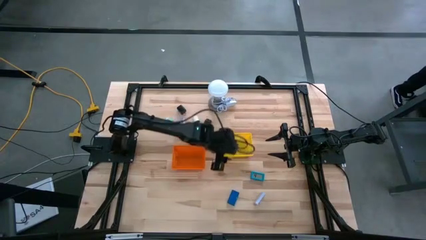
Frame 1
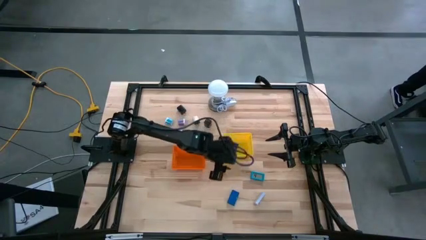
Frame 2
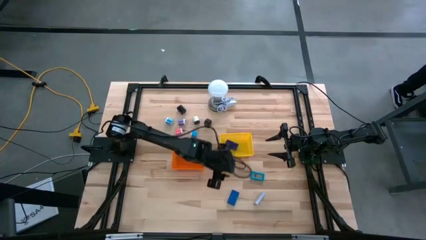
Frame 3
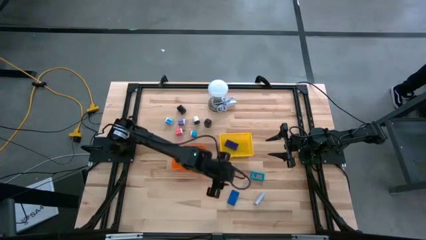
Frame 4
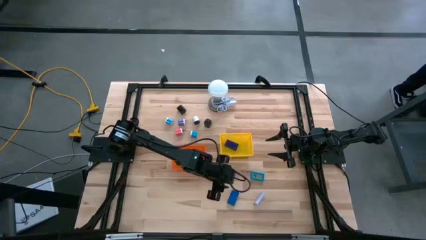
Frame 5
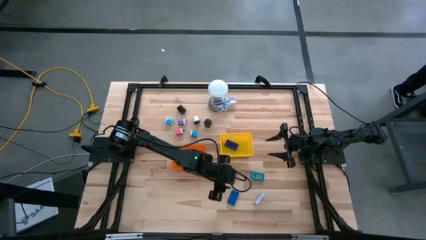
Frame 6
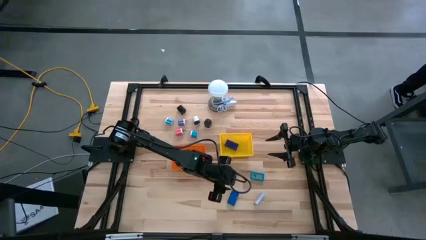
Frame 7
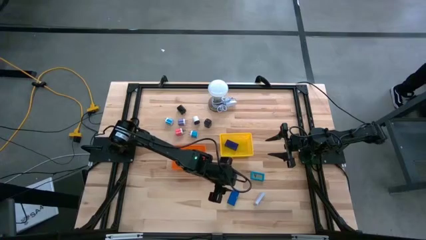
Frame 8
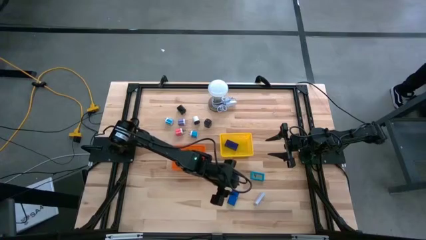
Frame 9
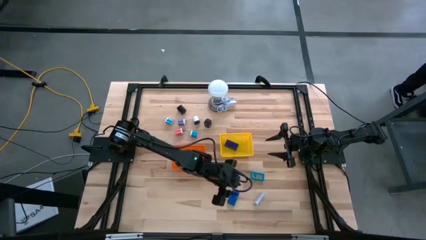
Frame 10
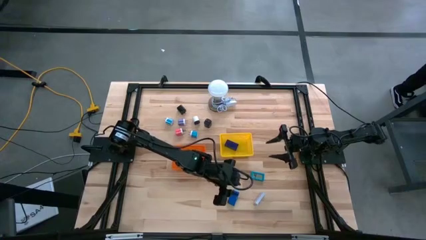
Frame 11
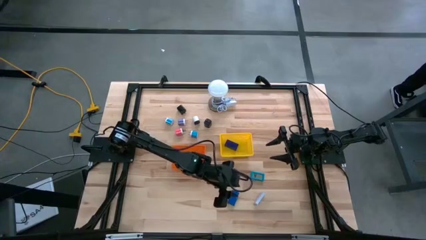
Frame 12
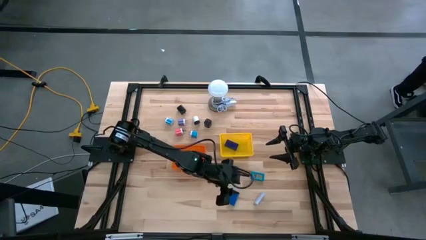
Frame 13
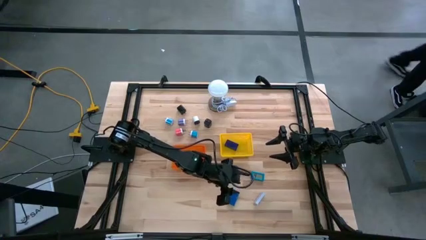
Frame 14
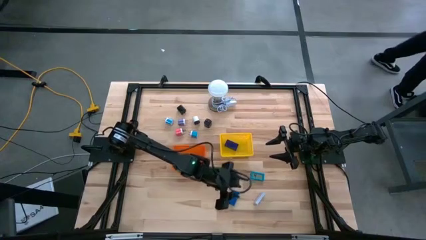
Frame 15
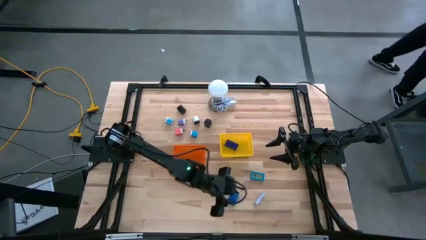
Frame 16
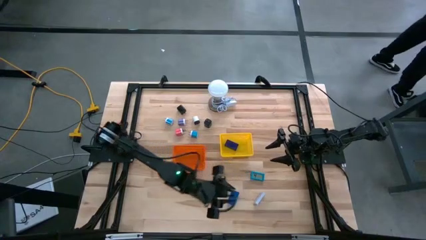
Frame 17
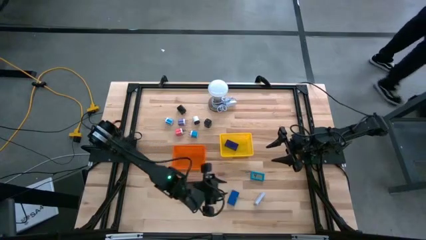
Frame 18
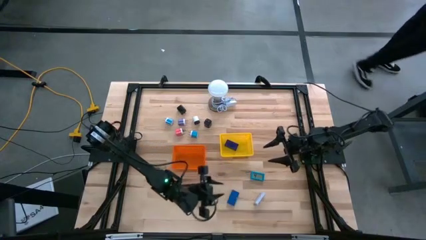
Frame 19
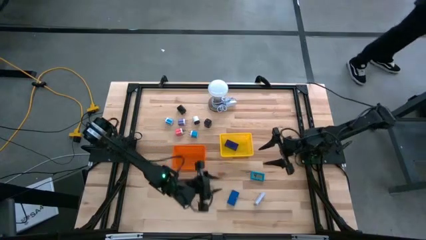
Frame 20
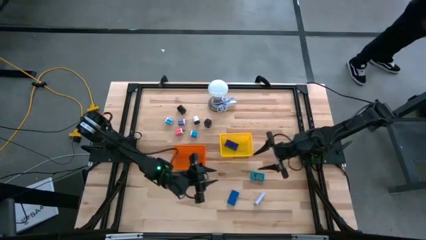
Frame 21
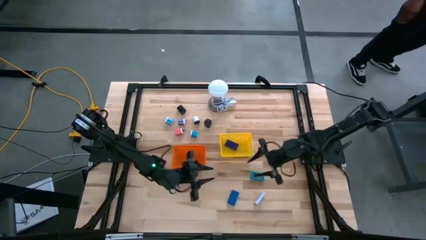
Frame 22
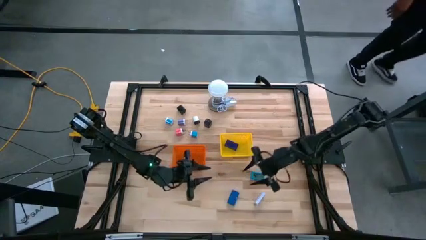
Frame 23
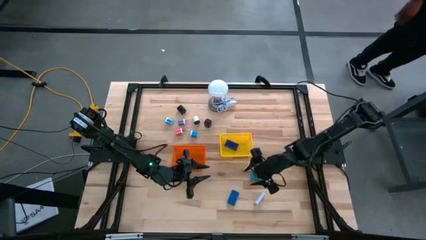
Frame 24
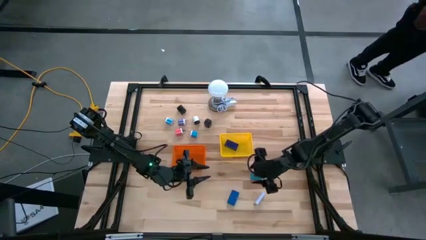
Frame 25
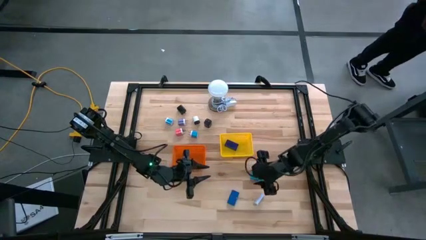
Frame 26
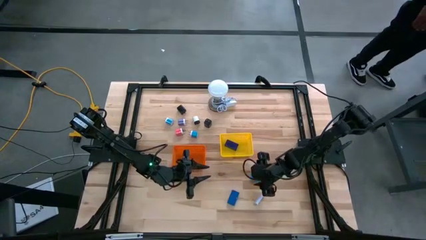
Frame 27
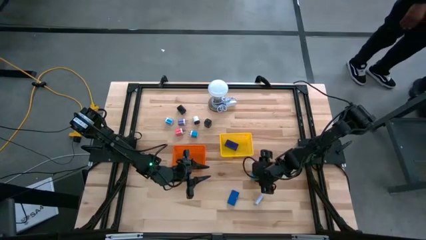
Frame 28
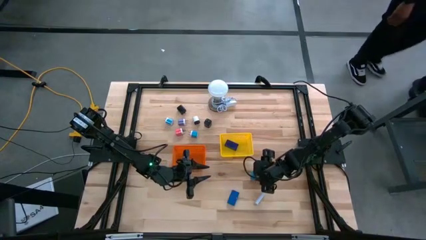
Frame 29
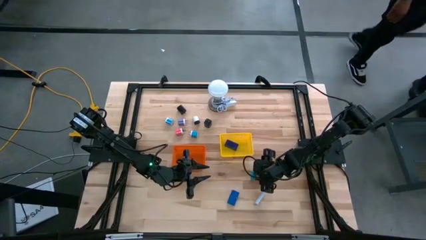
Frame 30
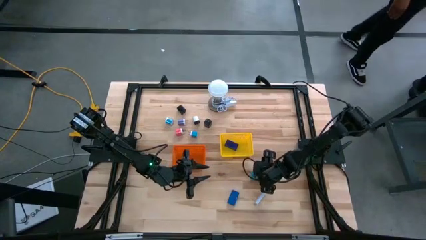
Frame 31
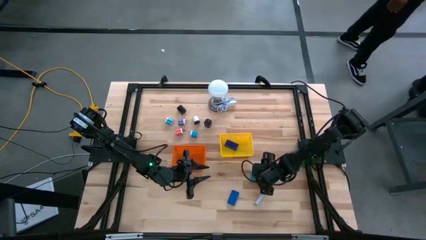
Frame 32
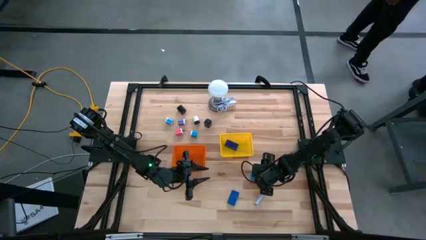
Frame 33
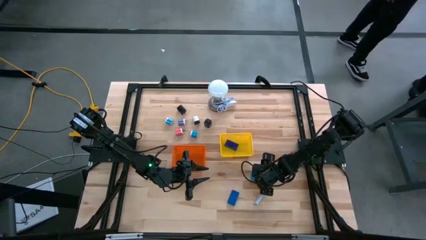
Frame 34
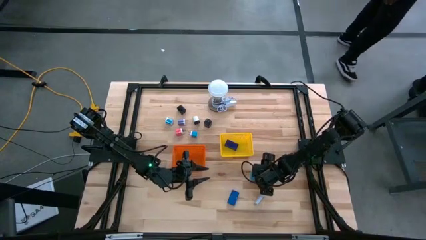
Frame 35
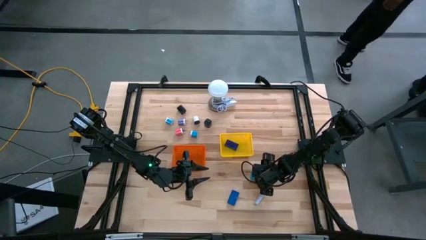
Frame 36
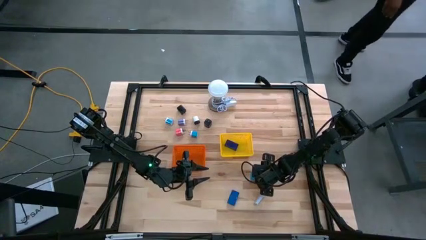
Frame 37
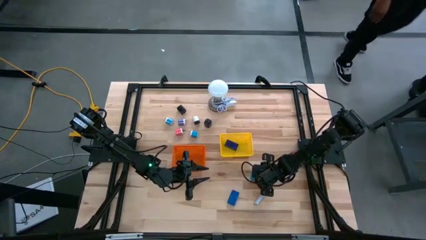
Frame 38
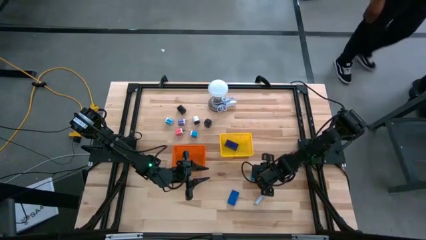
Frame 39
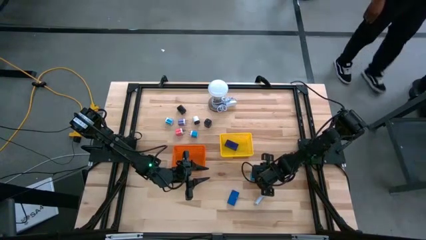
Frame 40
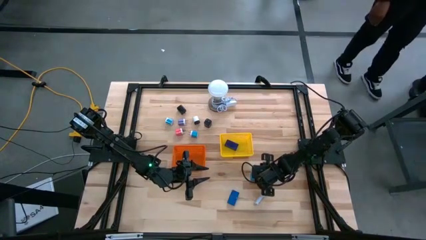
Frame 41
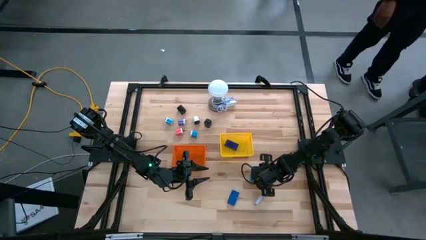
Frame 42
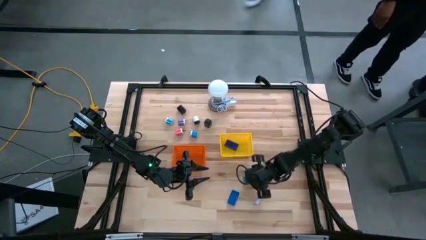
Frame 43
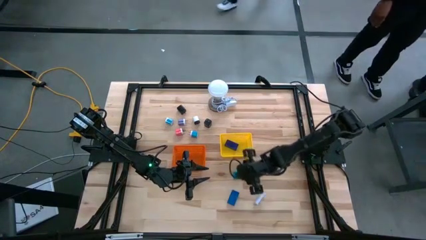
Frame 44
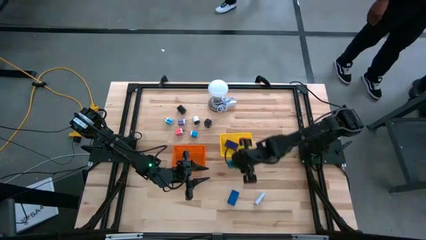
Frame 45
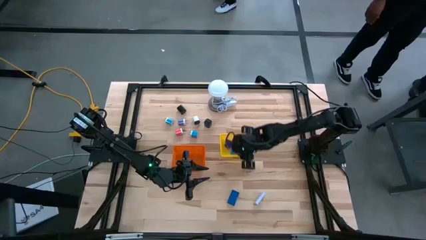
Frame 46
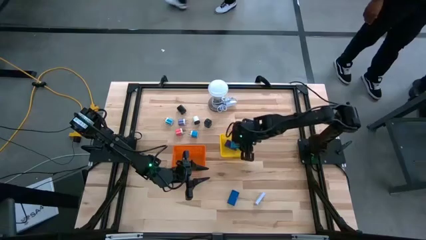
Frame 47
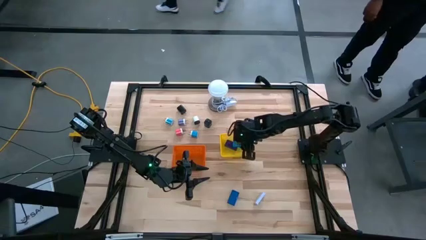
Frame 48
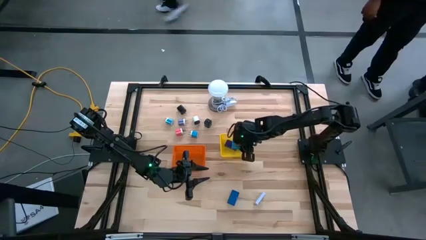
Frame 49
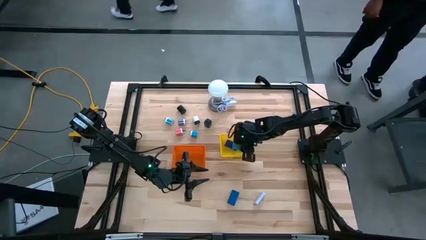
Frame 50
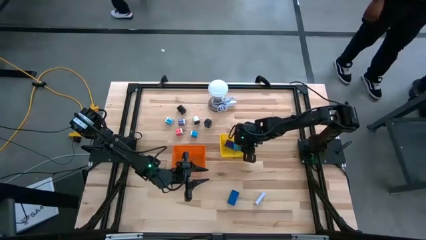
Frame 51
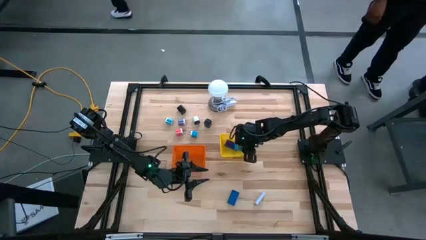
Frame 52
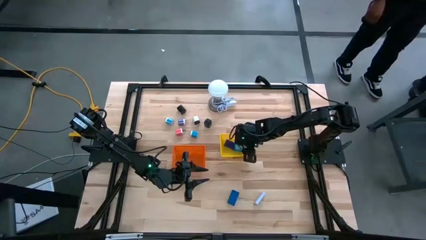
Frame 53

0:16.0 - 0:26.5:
Task: Pick & Place Office items
Put the light blue digital clock into the yellow bin

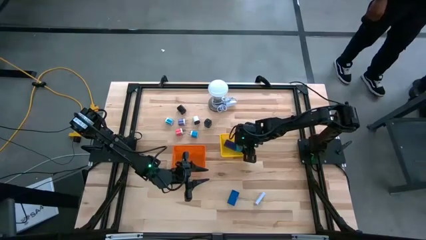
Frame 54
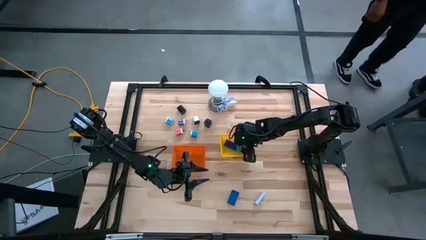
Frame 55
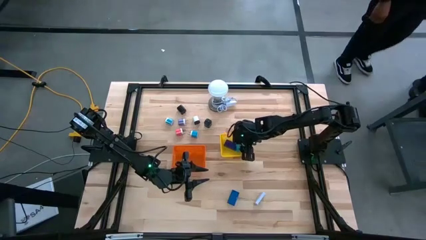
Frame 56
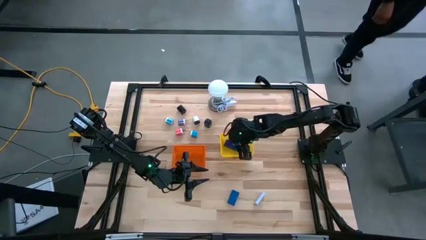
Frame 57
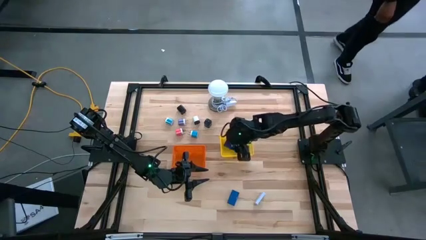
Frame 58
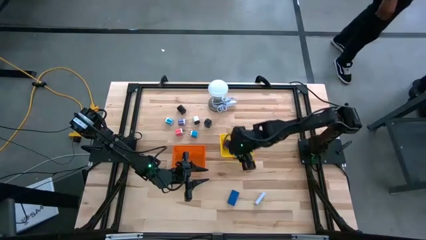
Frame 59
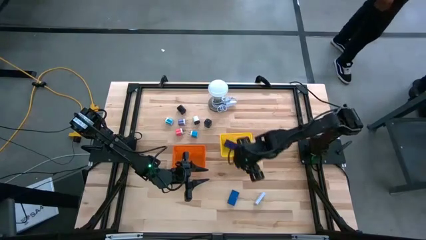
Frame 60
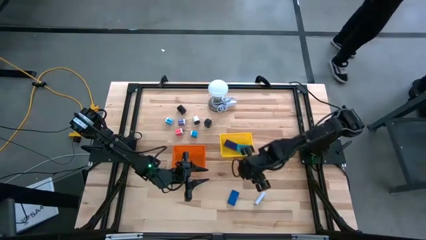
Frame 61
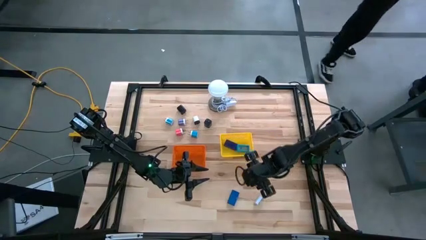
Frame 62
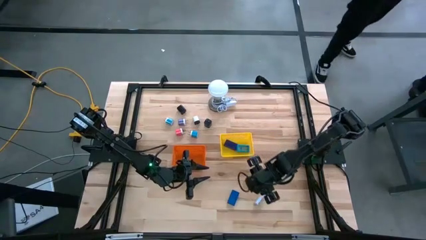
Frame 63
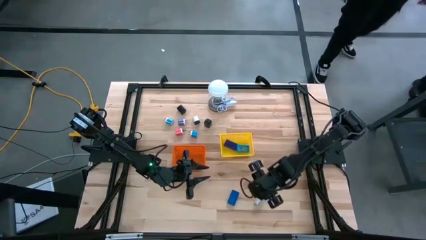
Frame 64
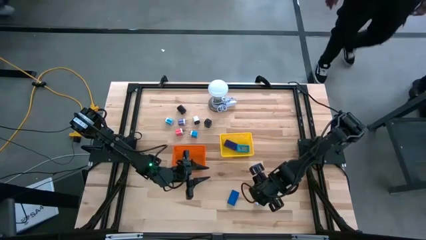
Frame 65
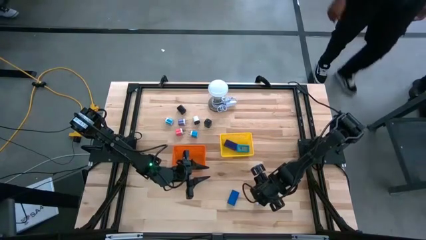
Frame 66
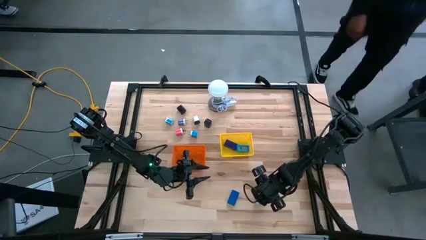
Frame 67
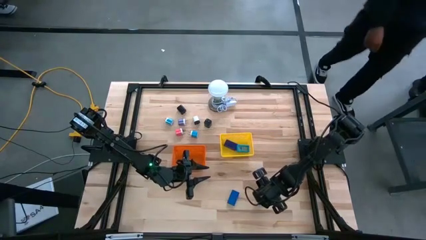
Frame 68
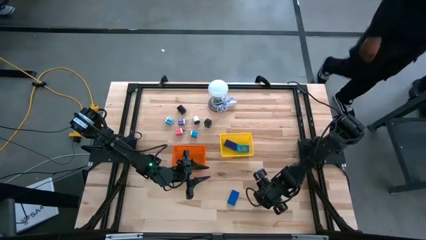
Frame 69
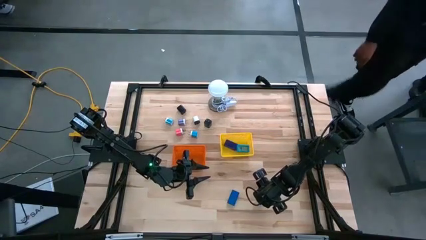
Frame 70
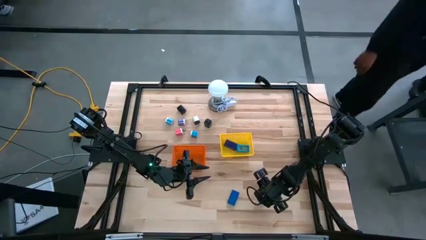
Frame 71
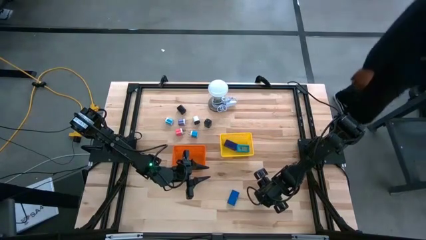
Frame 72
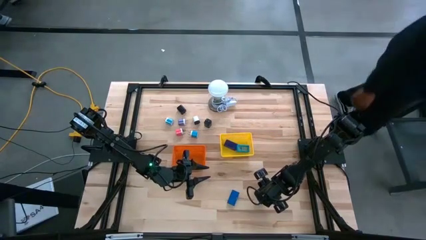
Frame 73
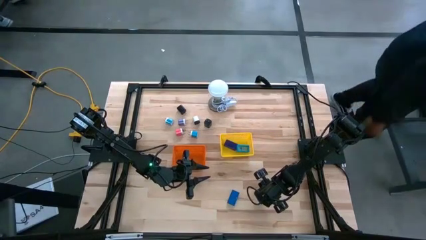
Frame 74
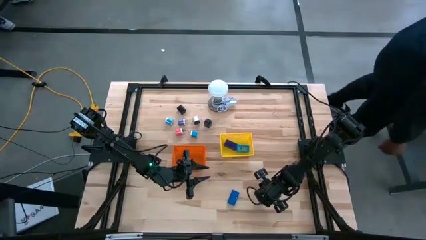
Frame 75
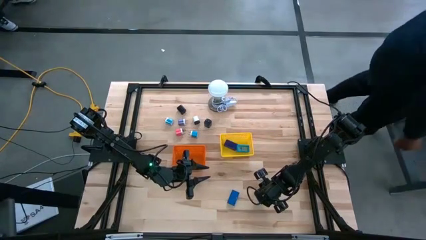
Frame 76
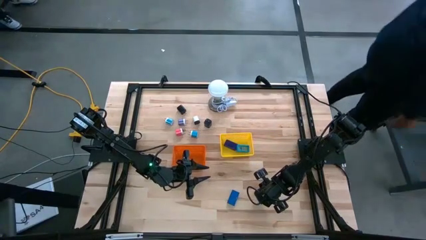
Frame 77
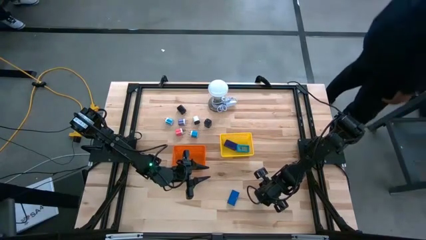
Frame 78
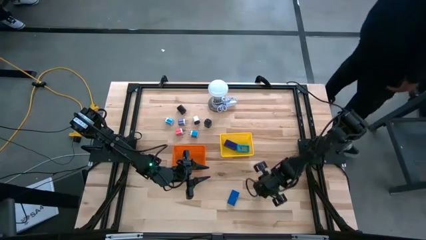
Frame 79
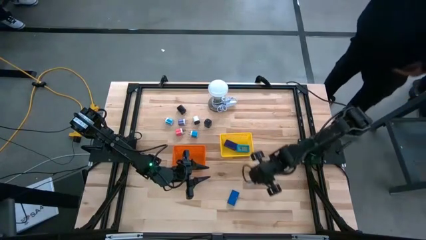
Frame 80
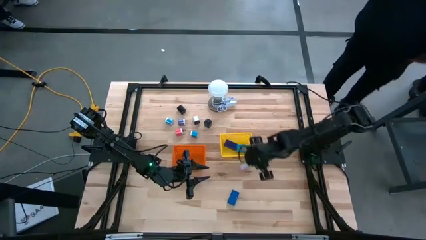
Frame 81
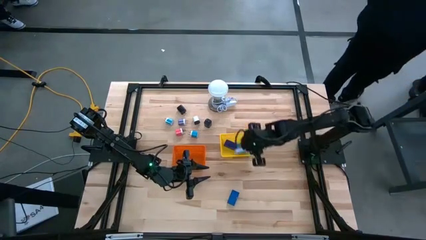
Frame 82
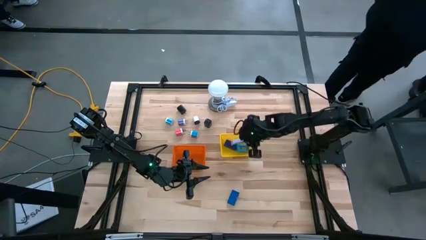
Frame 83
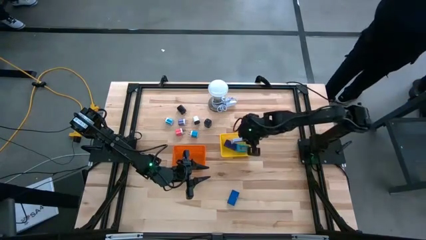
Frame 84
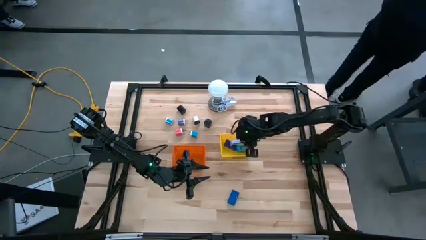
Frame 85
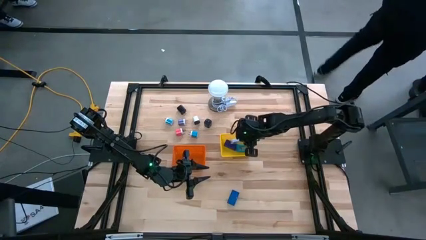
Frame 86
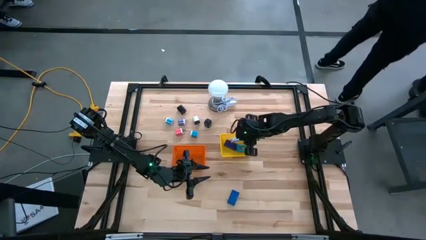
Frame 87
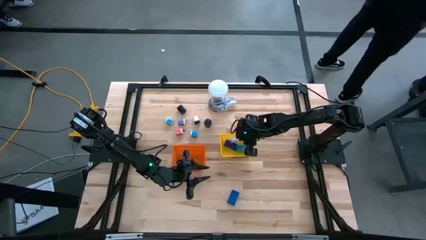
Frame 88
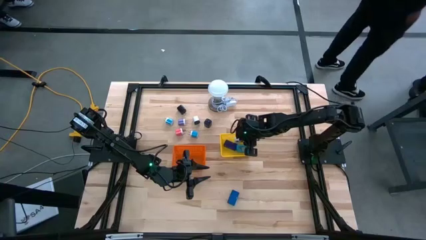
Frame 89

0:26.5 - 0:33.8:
Put the white digital clock into the yellow bin
